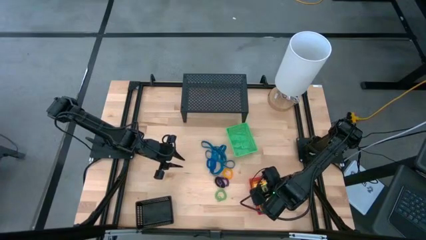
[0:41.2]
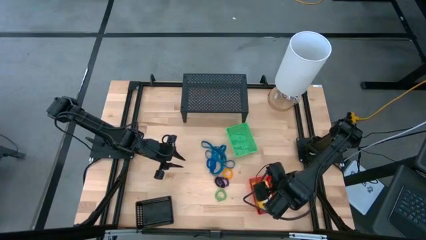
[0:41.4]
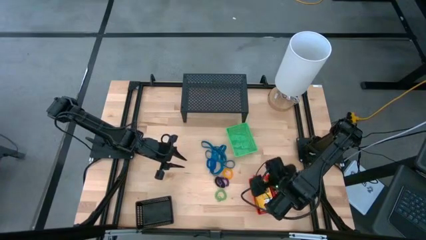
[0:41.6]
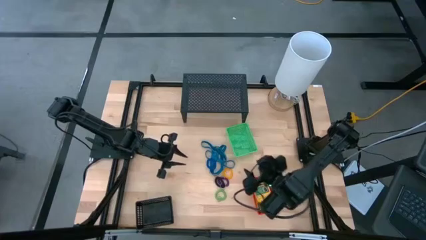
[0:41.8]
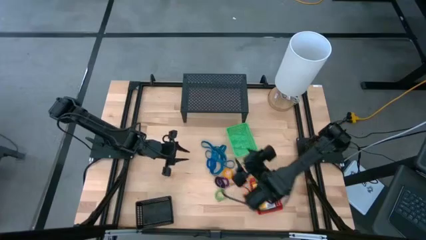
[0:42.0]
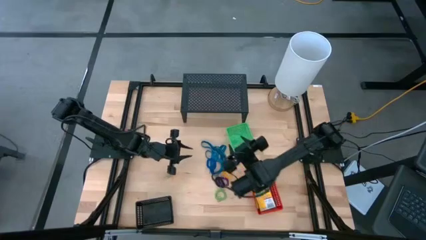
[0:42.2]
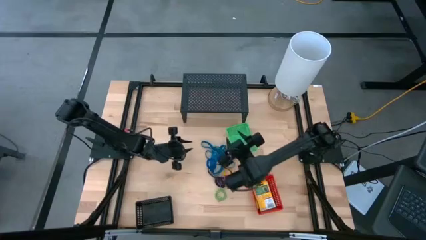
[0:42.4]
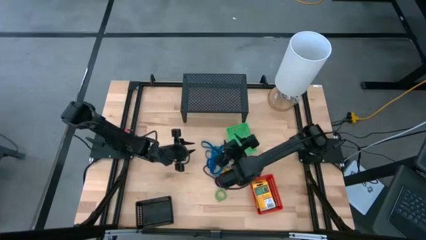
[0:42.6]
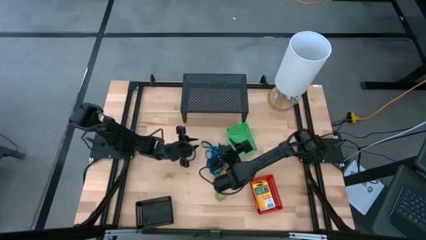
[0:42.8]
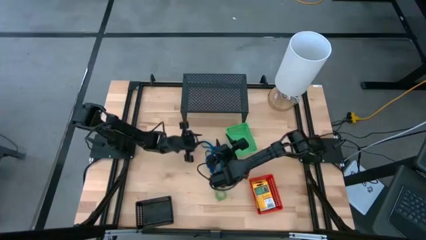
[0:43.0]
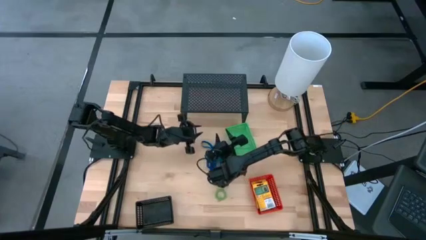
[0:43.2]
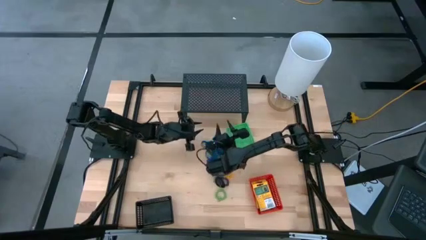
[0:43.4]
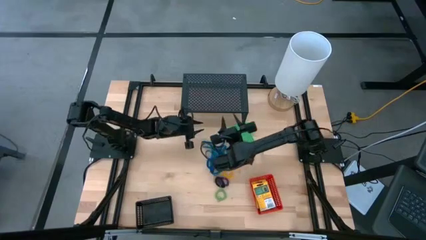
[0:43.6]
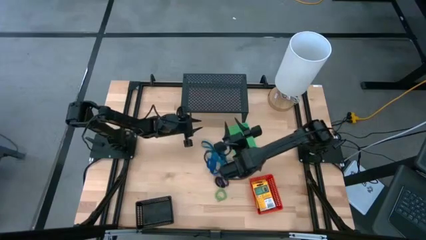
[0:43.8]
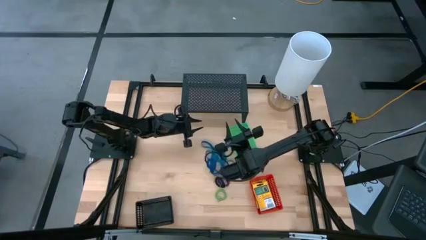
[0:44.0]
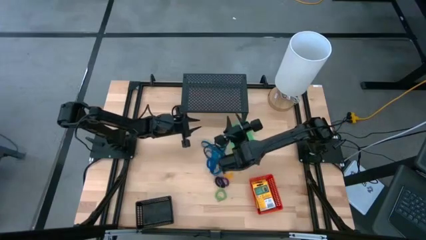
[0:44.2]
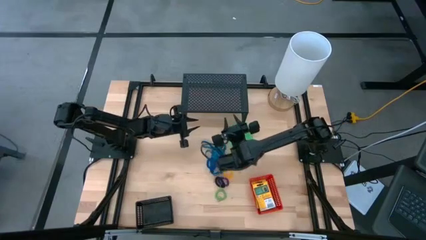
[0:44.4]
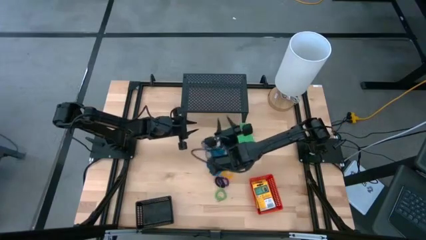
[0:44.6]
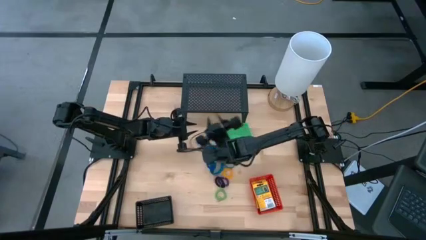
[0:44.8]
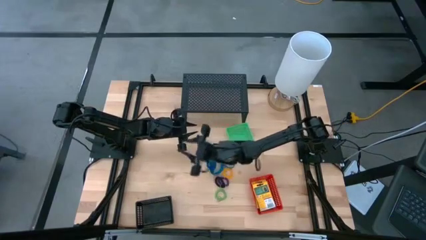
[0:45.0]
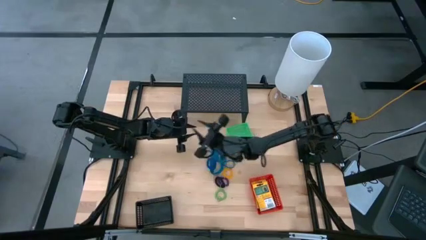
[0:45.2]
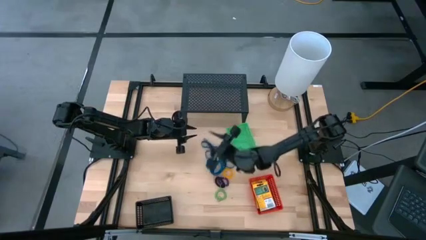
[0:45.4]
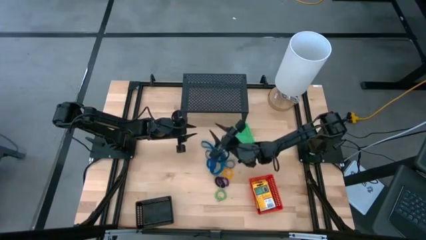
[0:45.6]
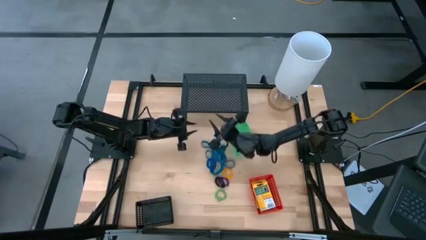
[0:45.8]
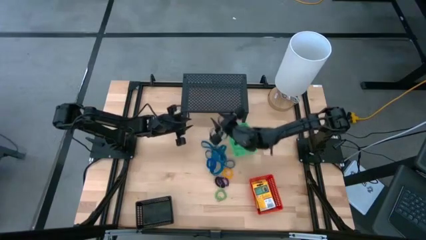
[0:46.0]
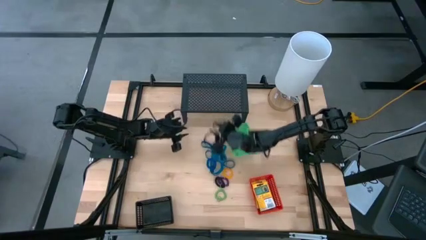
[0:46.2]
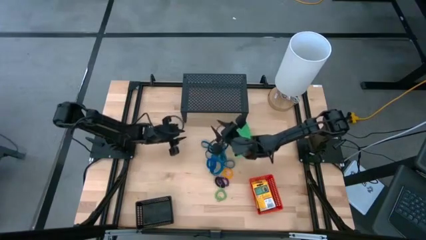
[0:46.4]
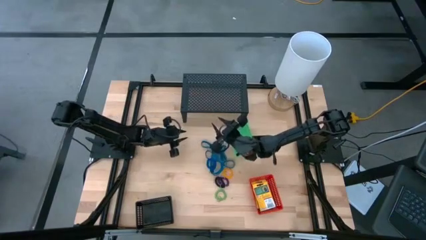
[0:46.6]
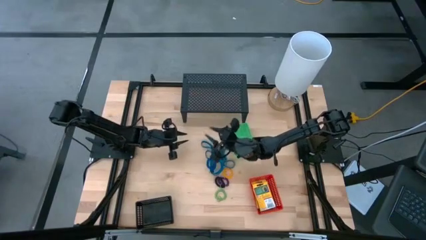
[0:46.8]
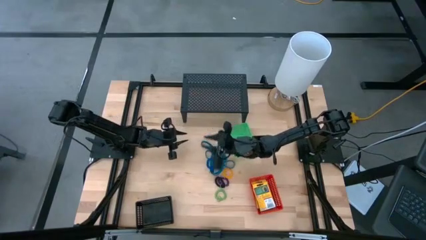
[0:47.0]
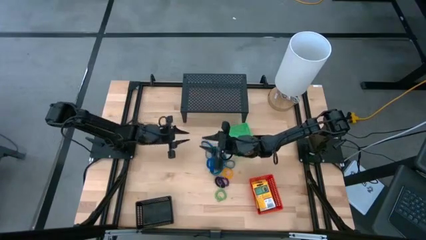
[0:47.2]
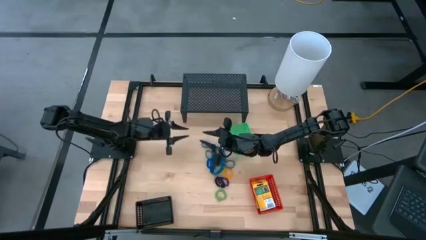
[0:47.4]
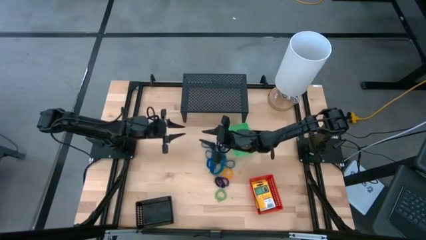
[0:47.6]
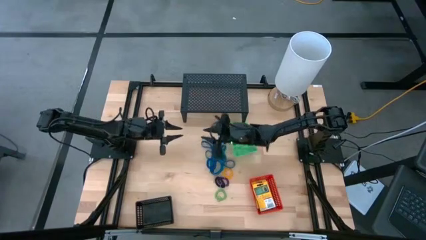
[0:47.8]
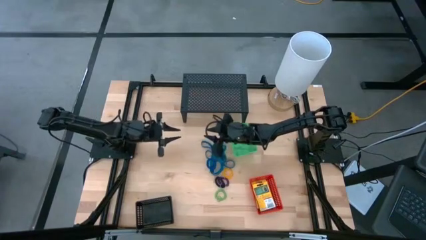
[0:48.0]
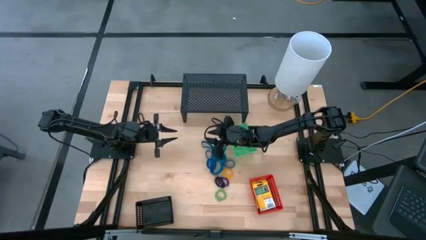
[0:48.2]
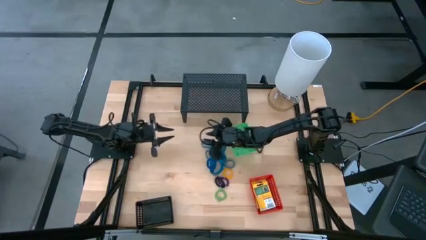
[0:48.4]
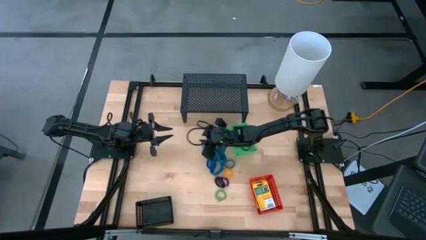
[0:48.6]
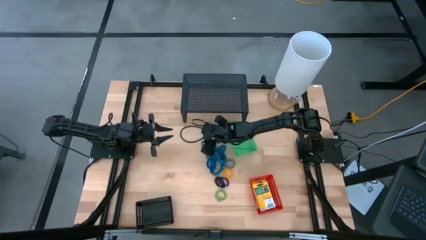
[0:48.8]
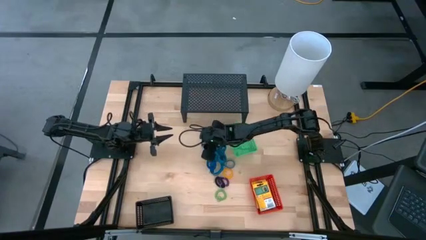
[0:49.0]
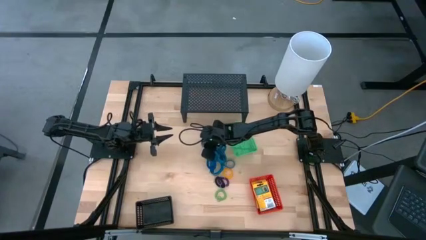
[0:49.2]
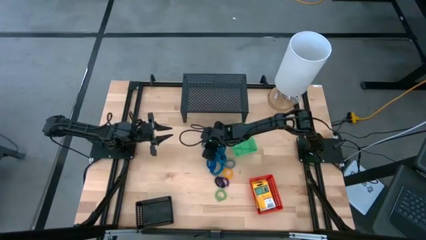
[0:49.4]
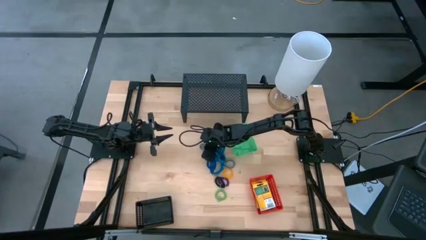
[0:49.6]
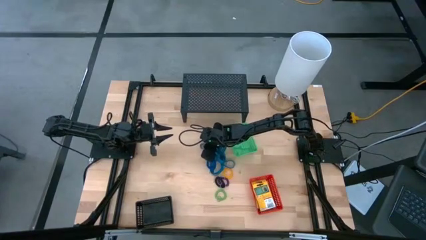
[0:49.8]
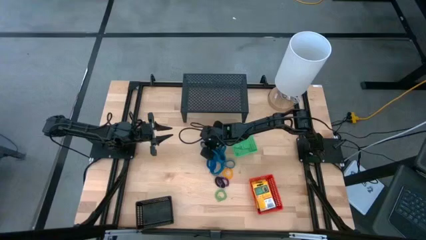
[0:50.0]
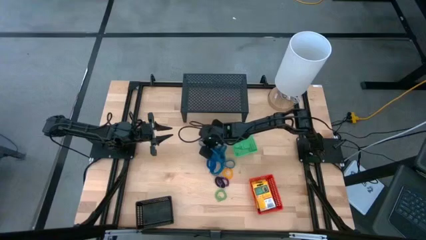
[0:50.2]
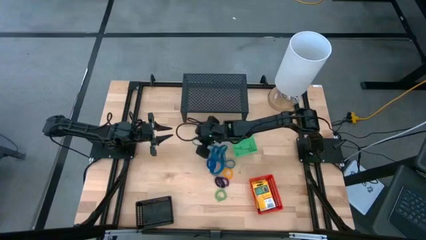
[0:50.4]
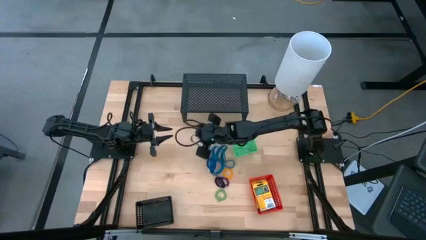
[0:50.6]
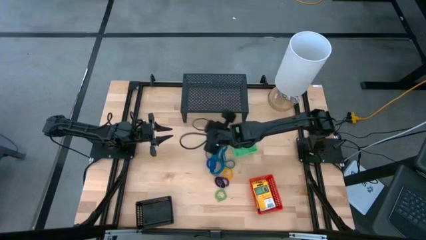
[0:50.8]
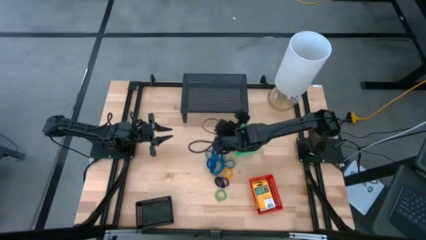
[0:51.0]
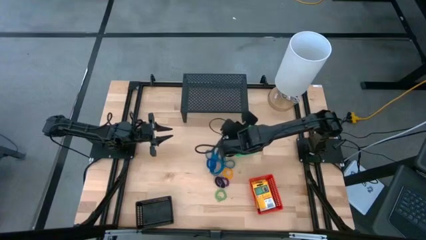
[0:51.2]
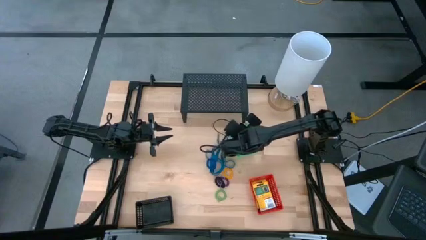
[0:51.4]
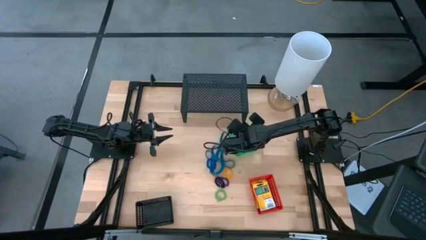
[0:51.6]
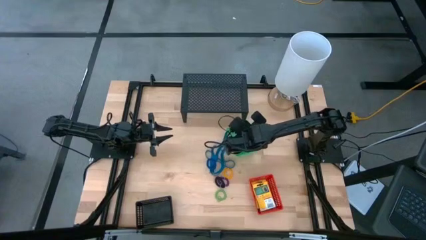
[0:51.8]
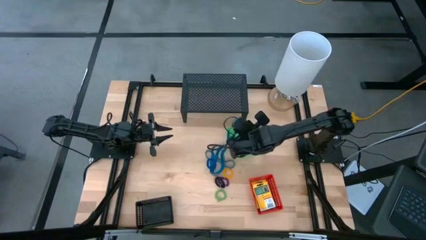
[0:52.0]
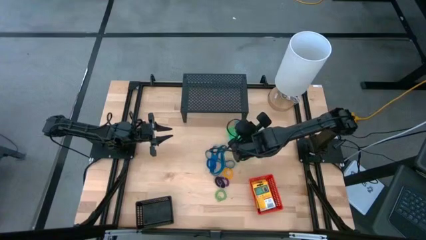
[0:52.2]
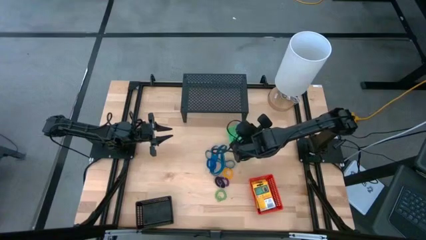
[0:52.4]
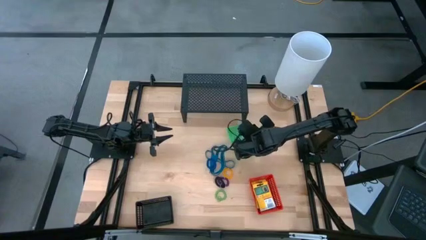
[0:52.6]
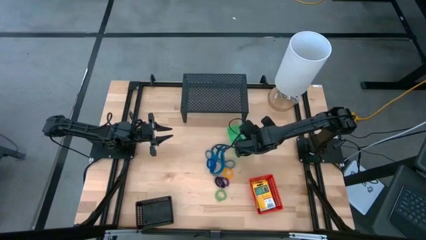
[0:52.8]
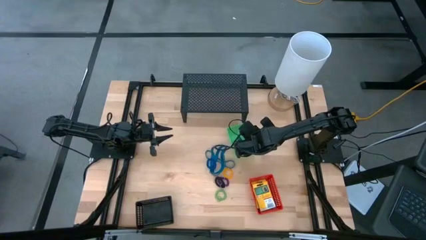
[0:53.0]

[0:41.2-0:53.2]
Task: Pick & Place Office Desk Supplies
Put the blue rubber band into the green basket

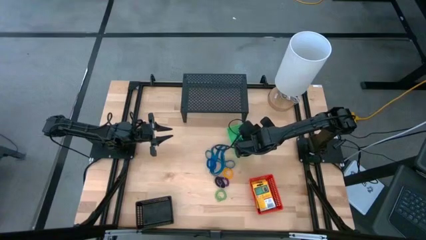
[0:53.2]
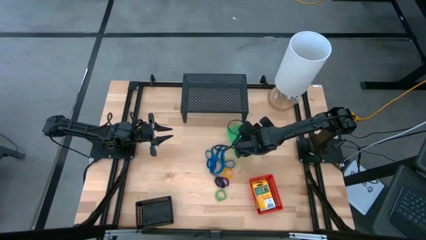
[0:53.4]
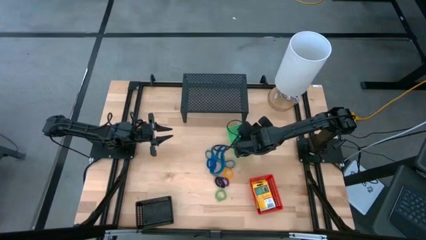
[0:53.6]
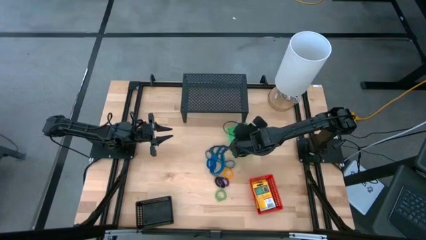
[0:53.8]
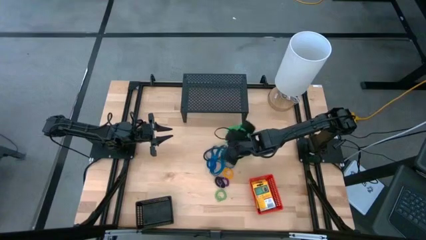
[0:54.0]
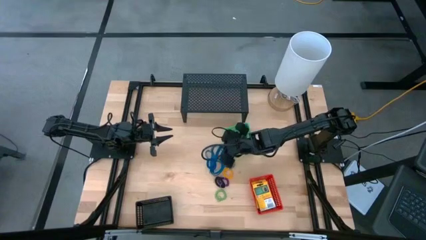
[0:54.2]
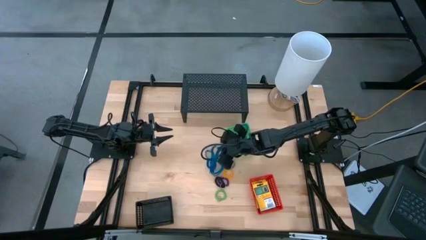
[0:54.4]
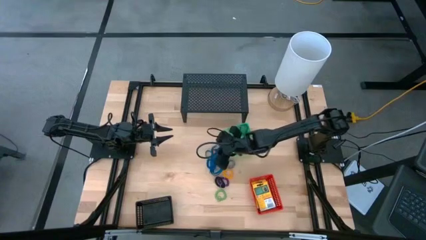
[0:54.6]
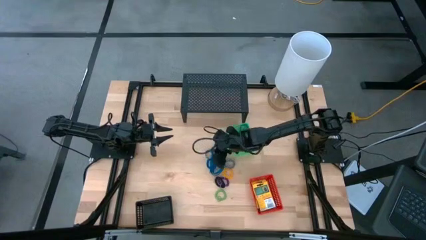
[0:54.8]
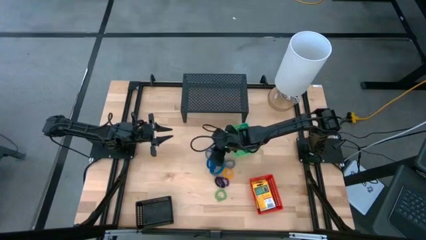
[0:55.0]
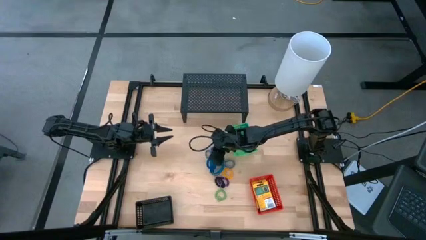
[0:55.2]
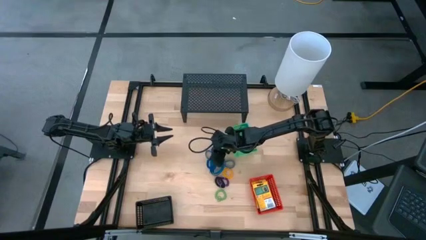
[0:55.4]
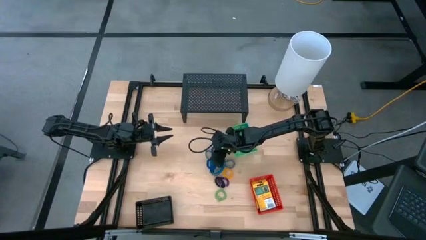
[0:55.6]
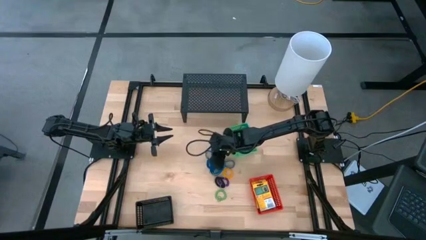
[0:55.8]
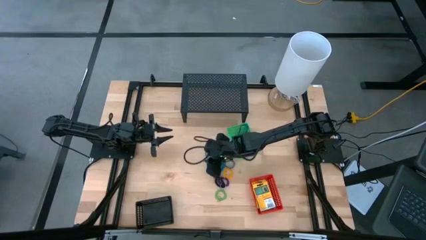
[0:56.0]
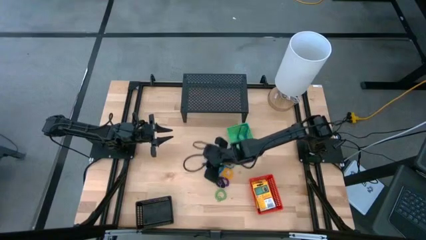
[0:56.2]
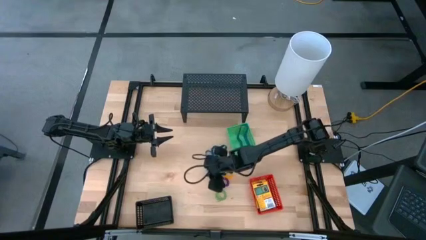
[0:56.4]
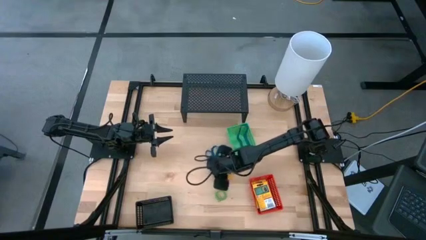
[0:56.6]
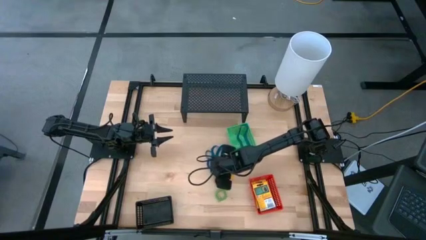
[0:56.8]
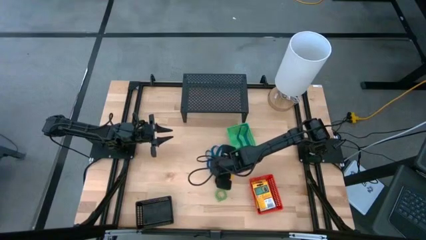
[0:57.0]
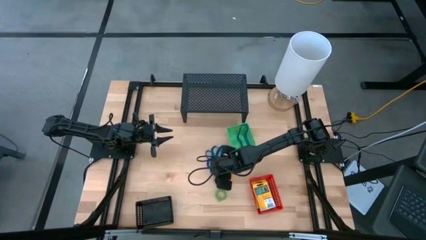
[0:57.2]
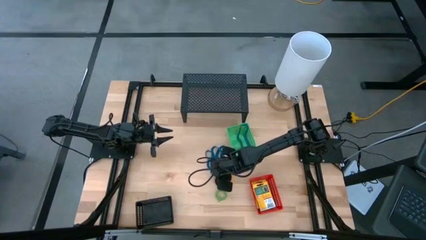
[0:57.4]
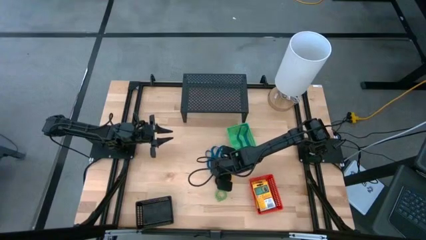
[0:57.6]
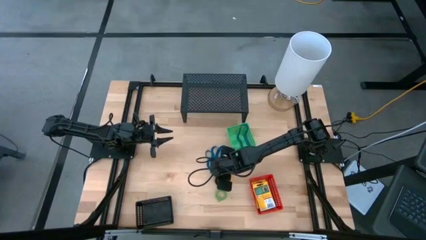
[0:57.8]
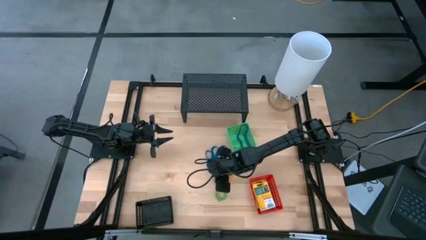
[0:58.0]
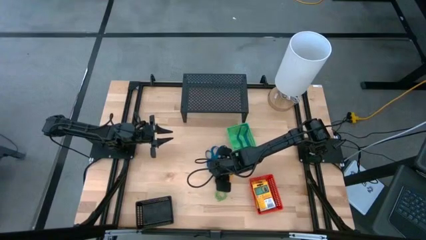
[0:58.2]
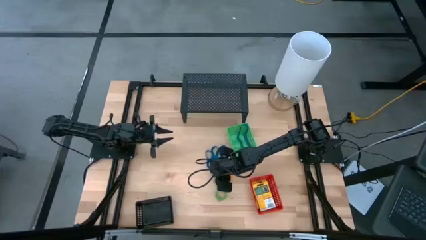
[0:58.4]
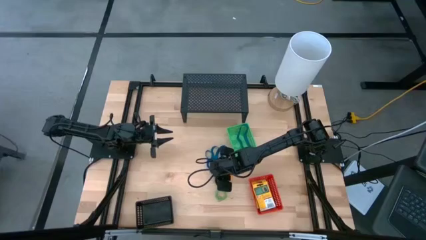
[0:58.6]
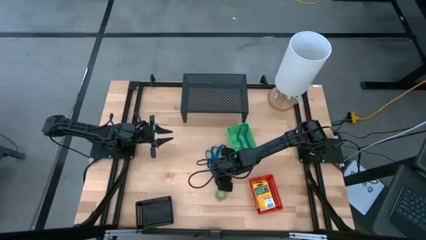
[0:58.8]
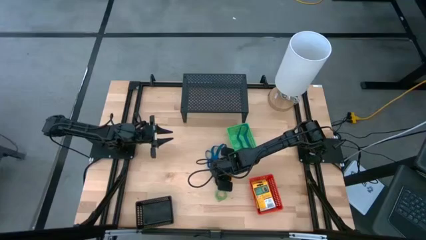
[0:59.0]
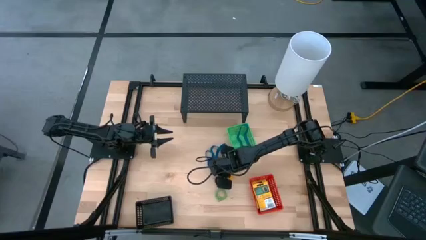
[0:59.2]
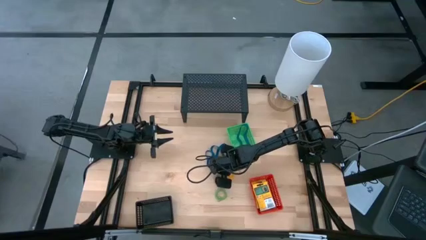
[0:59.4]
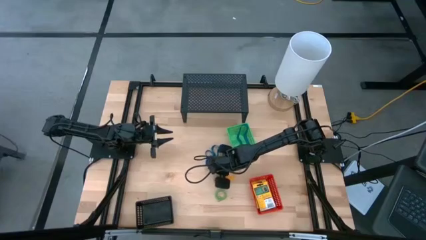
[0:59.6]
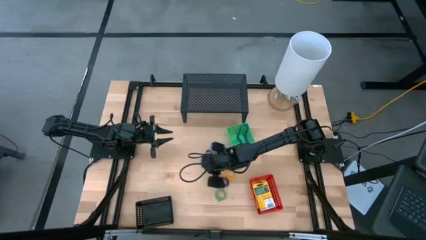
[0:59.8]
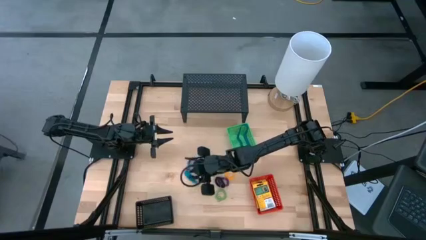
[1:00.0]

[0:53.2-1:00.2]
Put the blue rubber band into the green basket
